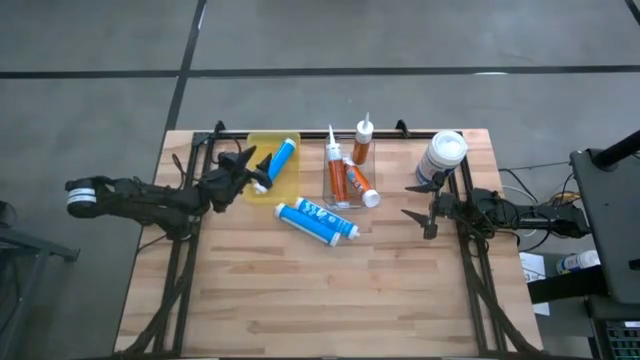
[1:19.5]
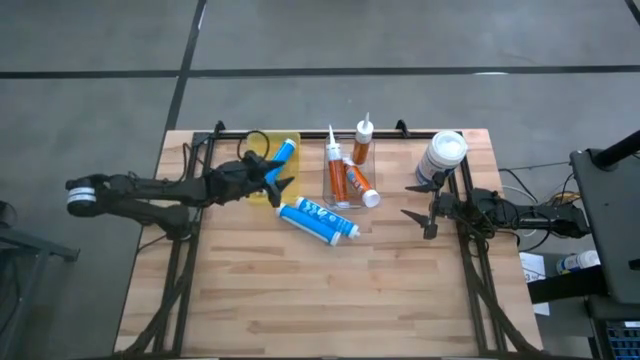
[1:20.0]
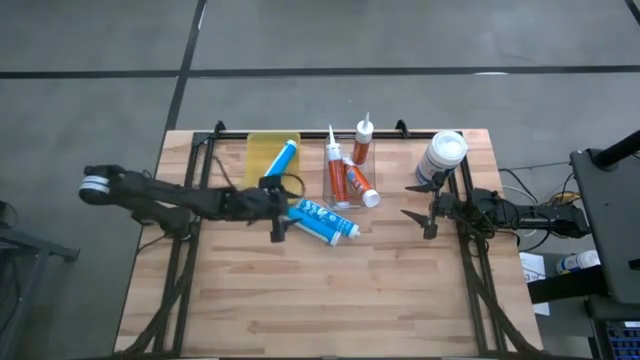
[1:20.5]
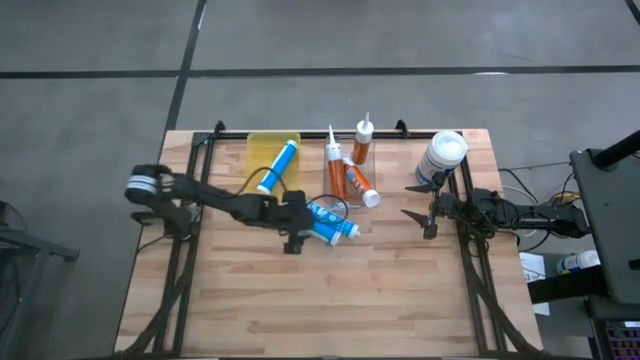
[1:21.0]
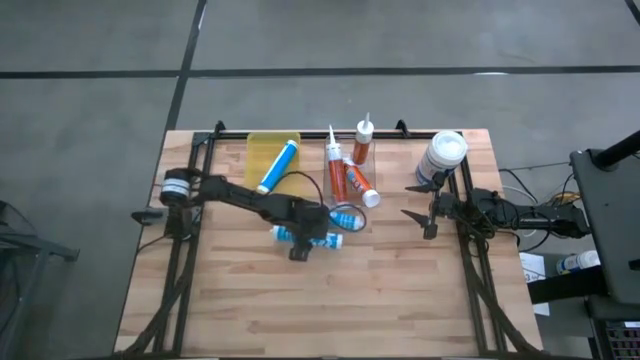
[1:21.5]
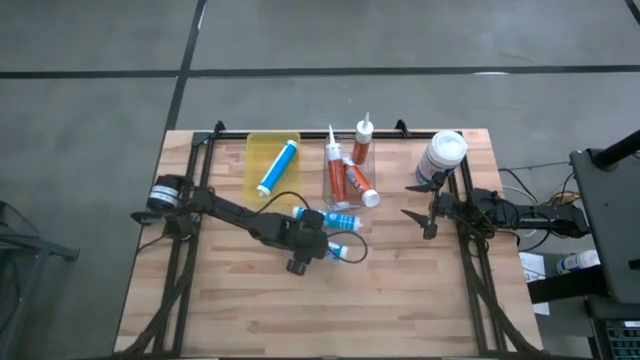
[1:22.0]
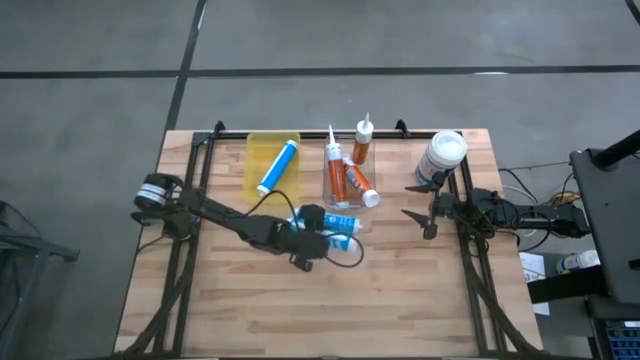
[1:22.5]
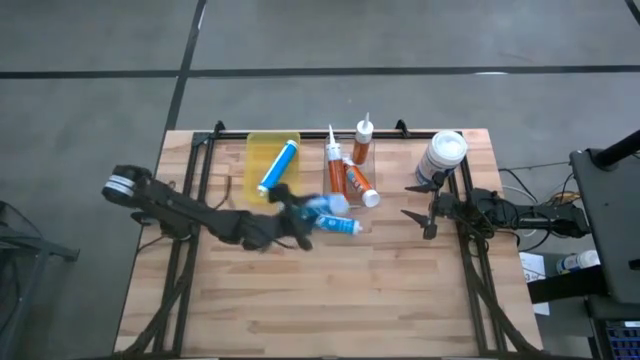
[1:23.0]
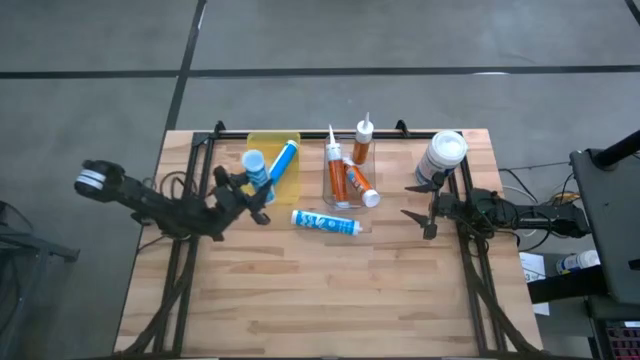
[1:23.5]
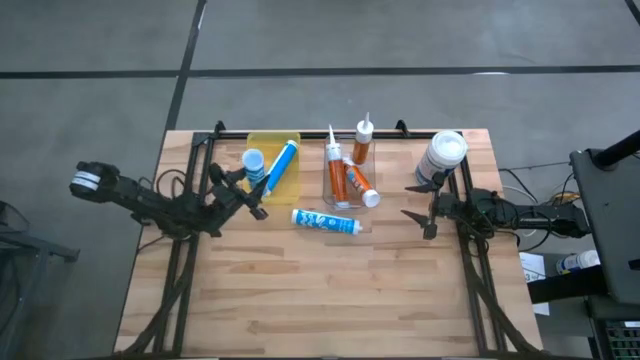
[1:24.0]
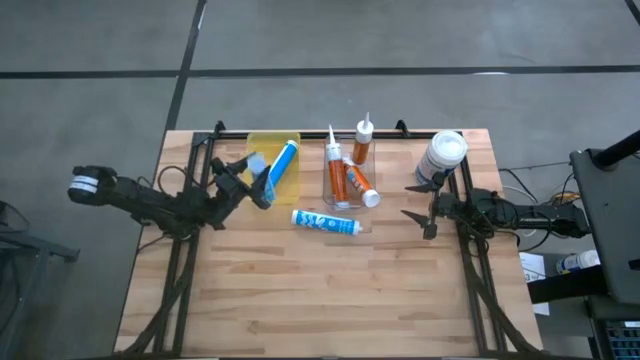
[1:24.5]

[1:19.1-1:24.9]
Task: Pick & place silicon tubes, Sealant and Lysol wipes
Put the bottom blue sealant into the yellow bin

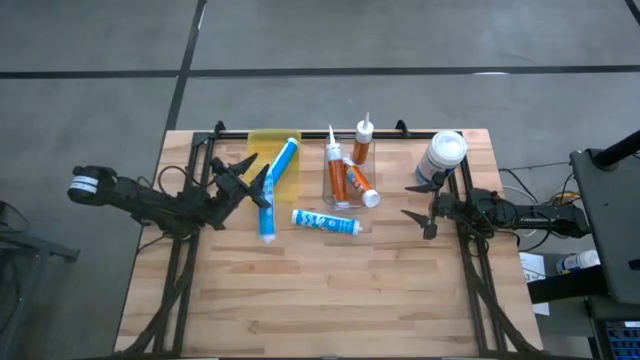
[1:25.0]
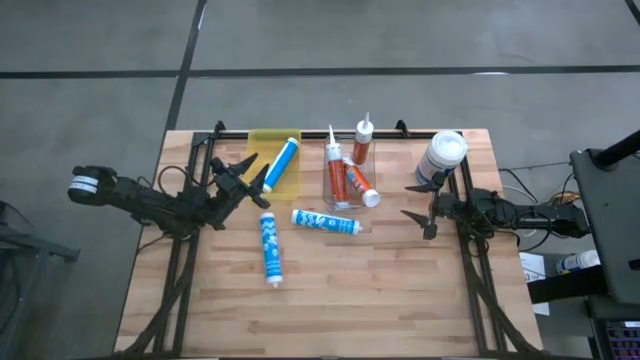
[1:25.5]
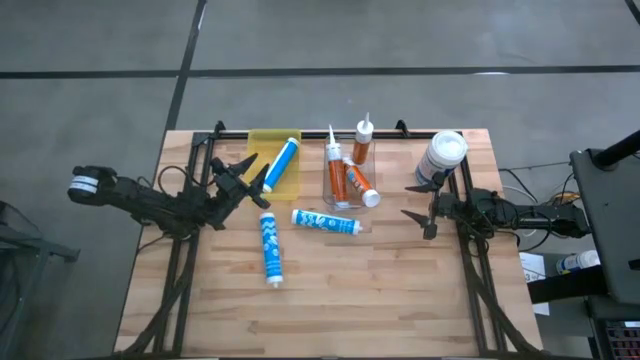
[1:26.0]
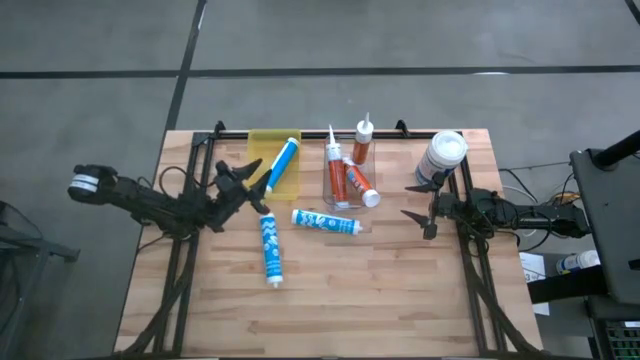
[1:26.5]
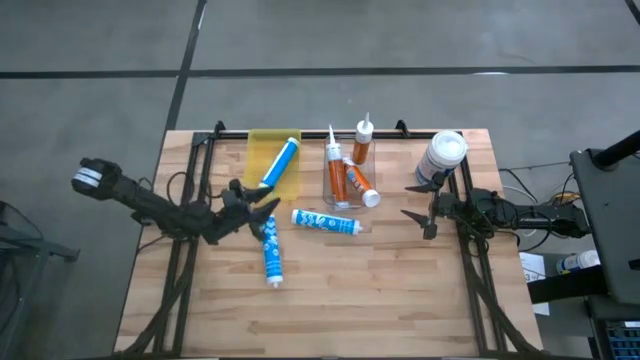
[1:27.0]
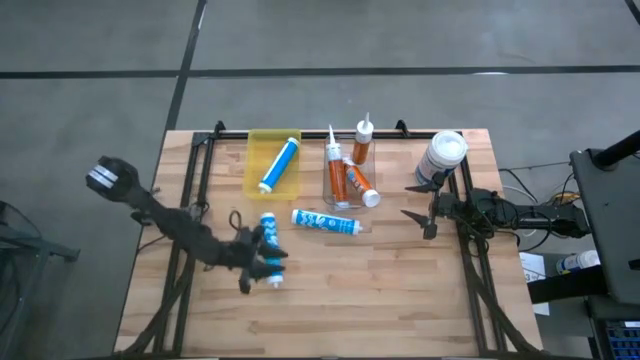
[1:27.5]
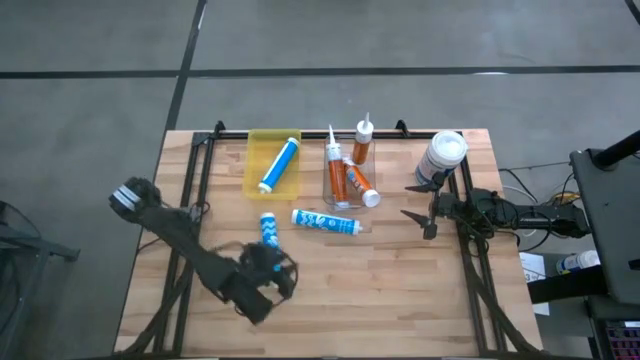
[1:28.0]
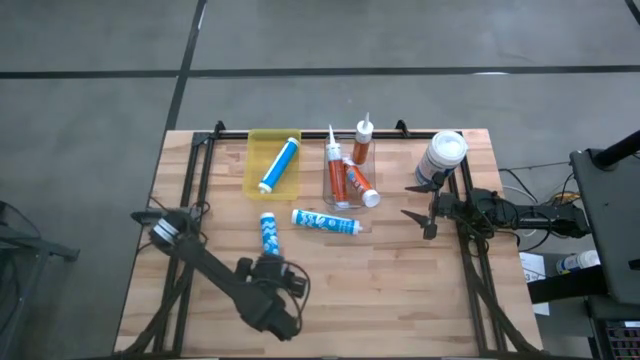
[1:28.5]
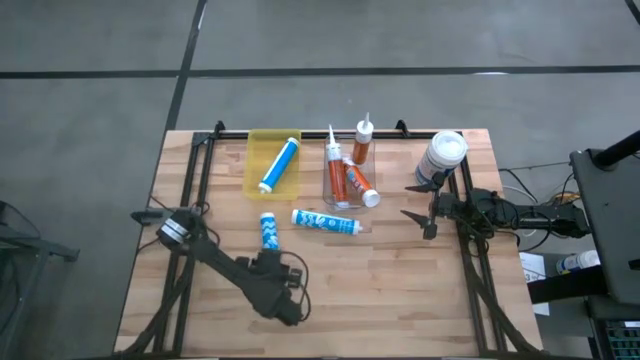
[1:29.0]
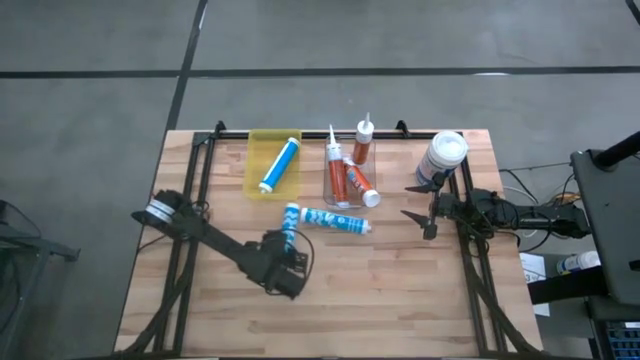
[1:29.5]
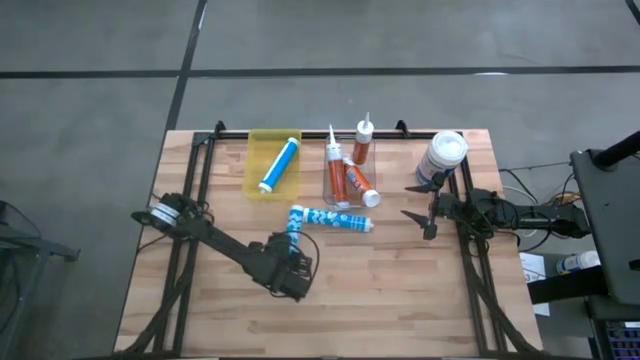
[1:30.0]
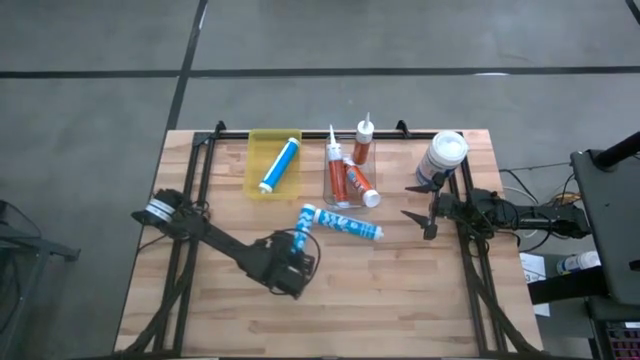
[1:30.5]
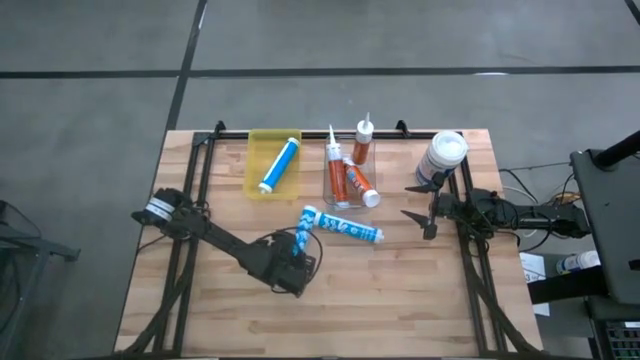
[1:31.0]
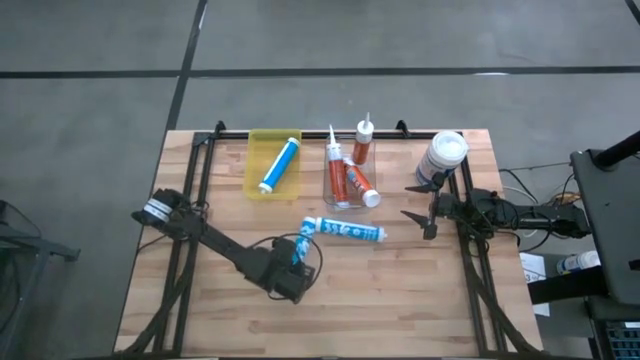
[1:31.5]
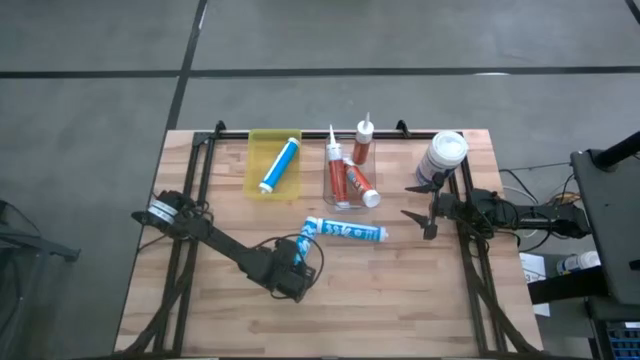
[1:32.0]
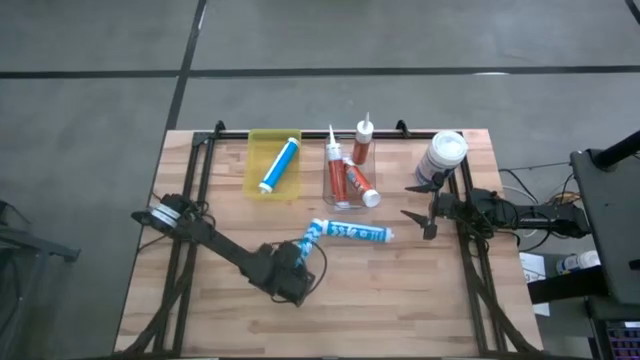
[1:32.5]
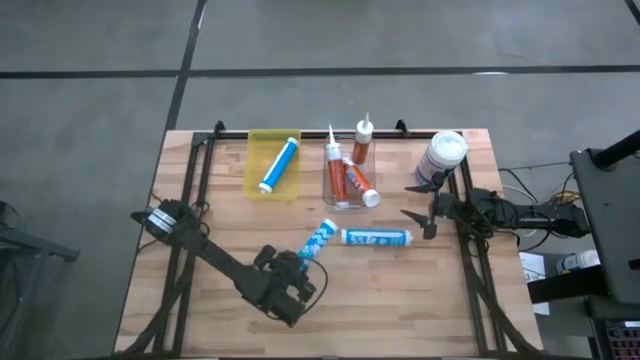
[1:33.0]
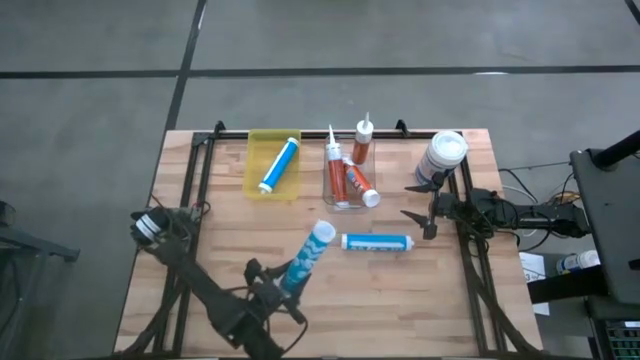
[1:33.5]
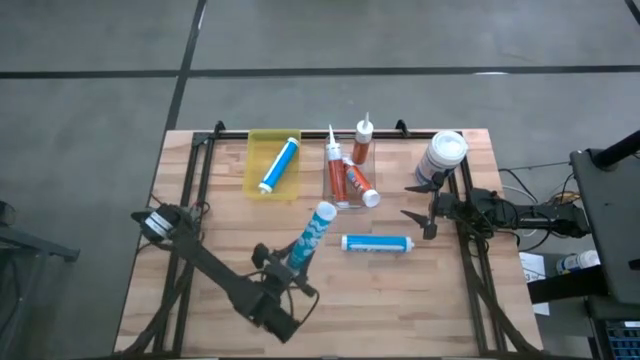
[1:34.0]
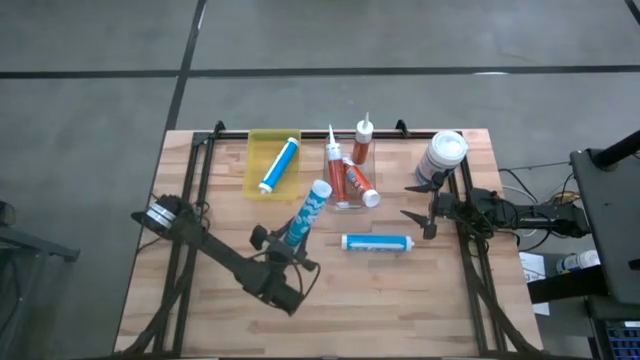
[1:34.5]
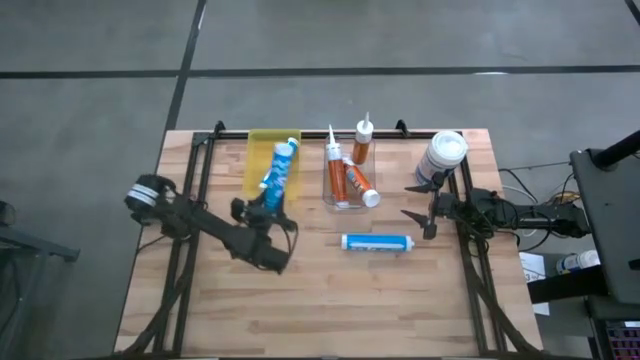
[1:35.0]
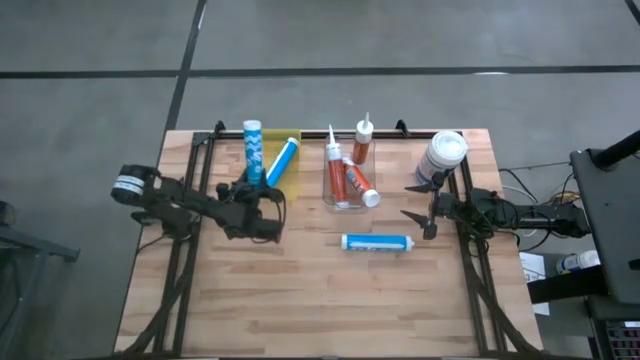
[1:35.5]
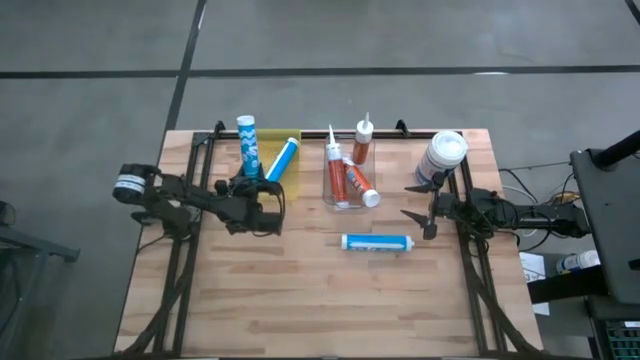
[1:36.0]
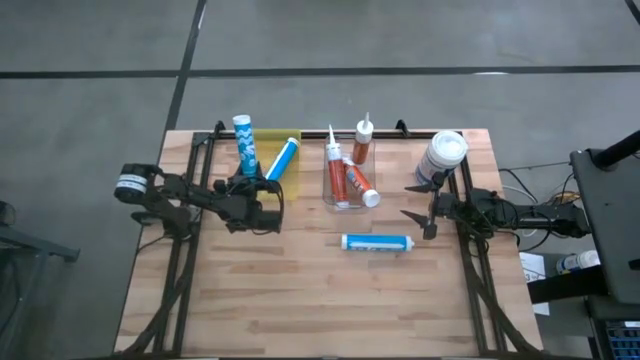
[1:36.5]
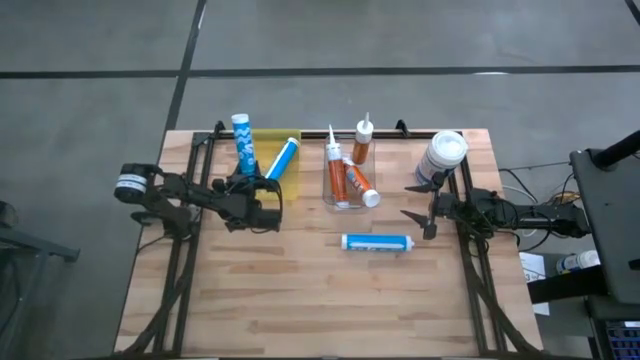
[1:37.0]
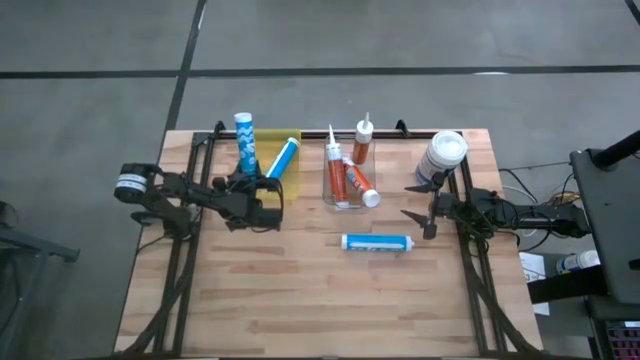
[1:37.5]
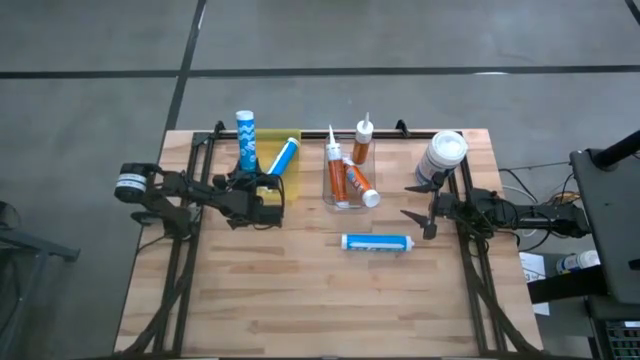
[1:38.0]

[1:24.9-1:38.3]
Put the bottom blue sealant into the yellow bin

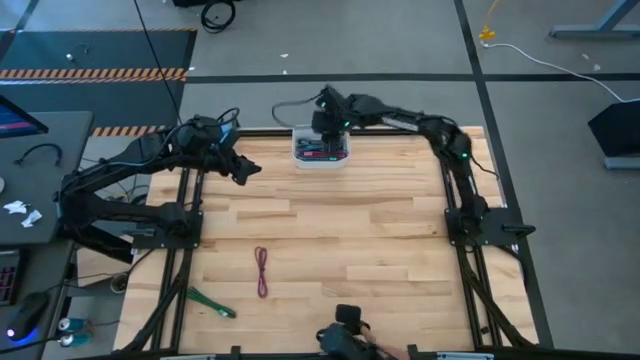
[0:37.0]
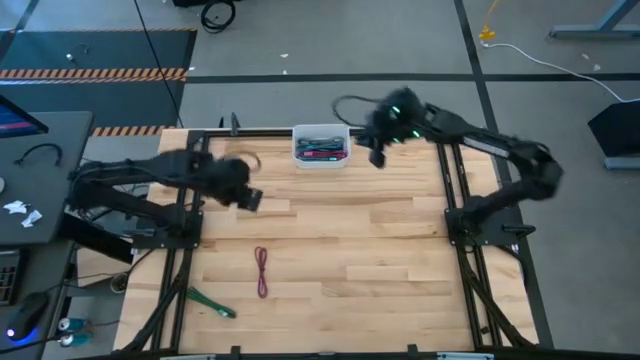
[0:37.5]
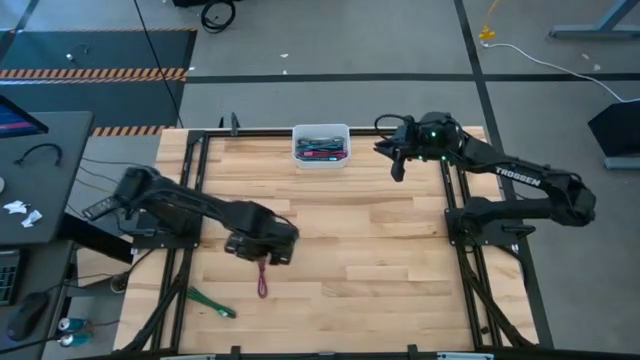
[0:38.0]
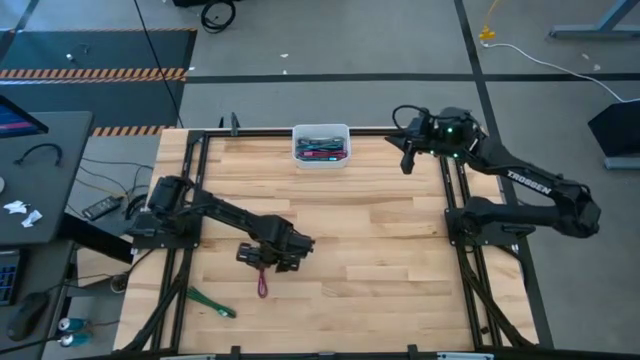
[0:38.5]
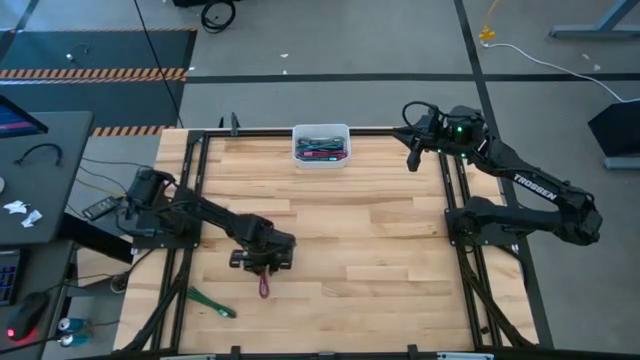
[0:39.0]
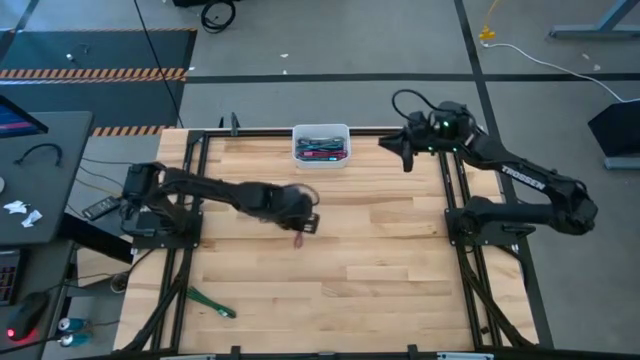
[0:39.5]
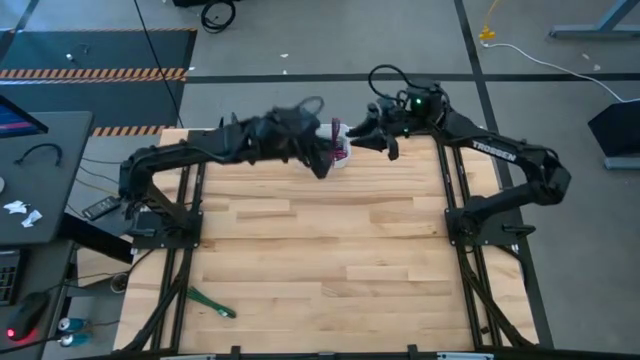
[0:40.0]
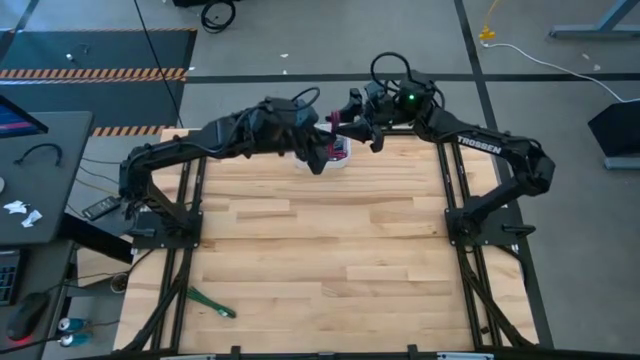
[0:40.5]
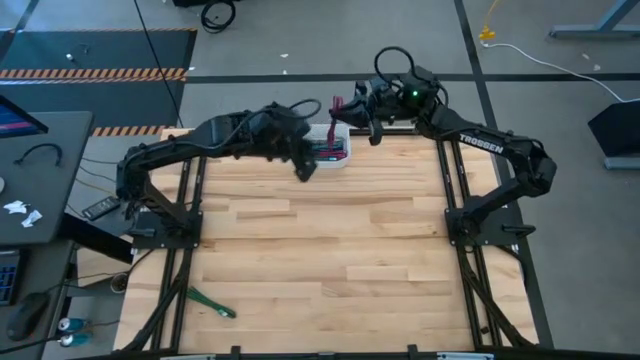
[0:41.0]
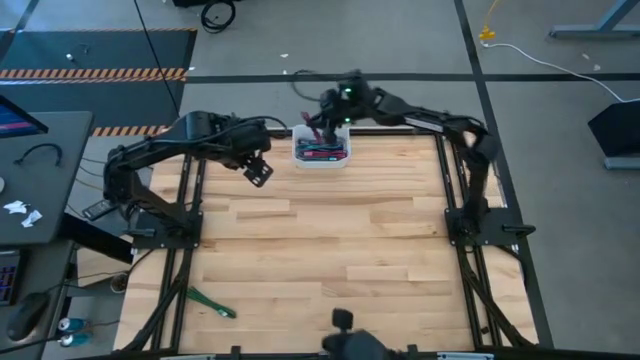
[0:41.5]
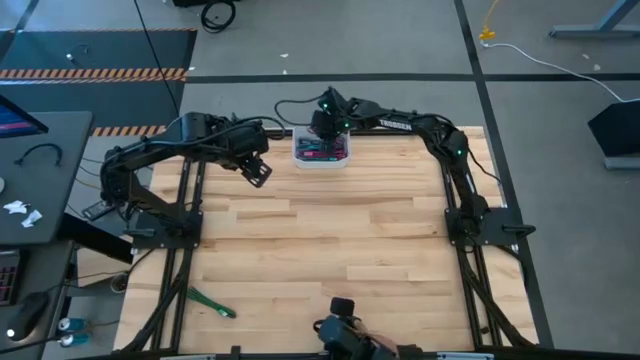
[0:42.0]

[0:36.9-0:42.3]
Task: Pick and place USB-C Cables
Put the pink charger cable into the white bin
